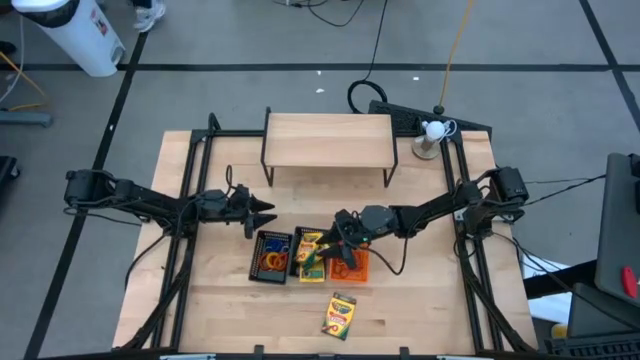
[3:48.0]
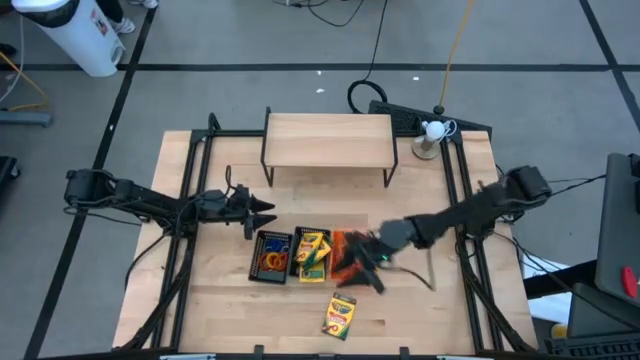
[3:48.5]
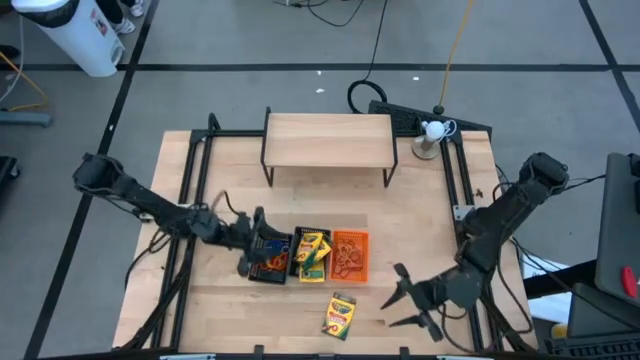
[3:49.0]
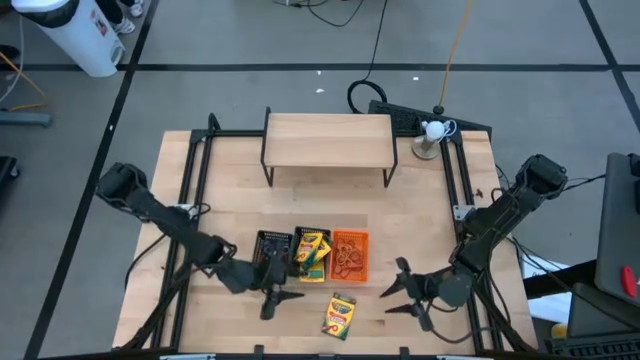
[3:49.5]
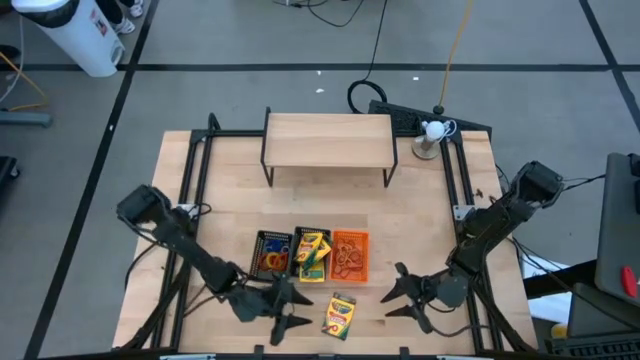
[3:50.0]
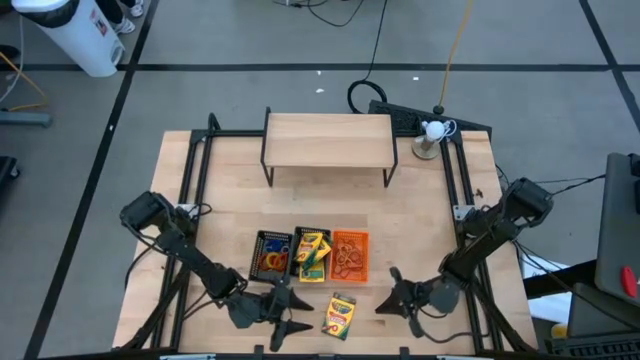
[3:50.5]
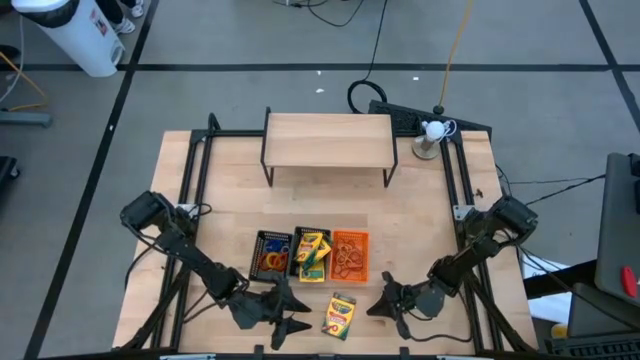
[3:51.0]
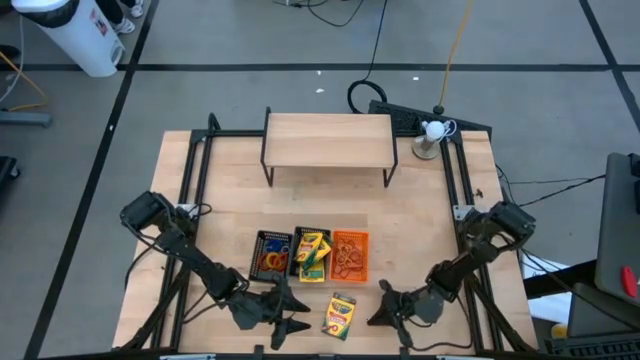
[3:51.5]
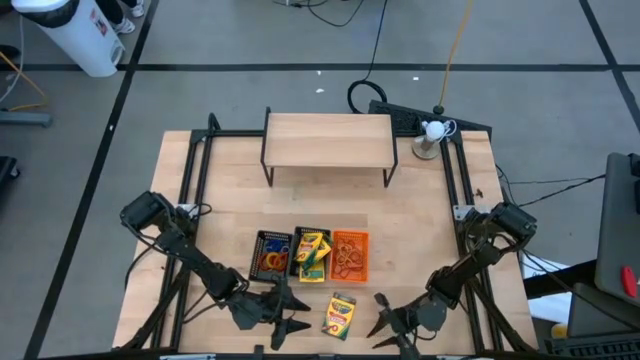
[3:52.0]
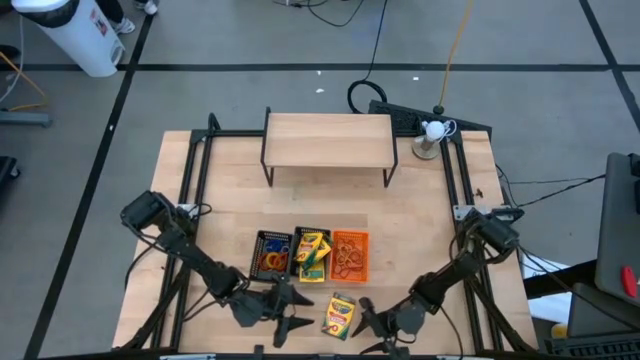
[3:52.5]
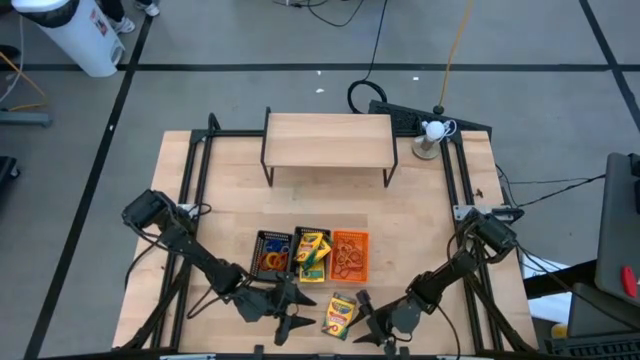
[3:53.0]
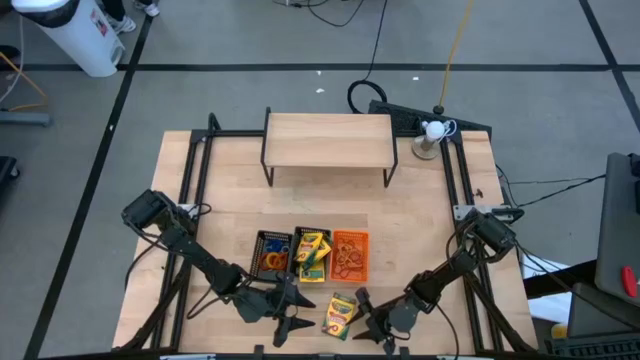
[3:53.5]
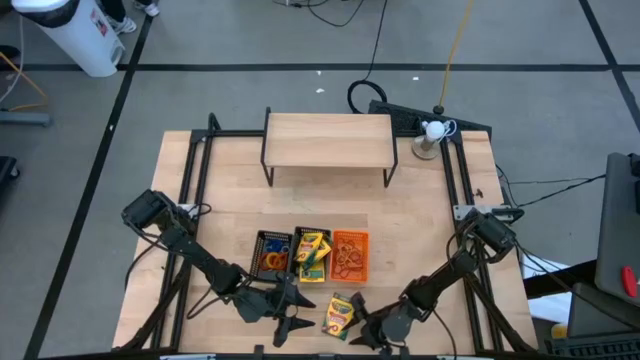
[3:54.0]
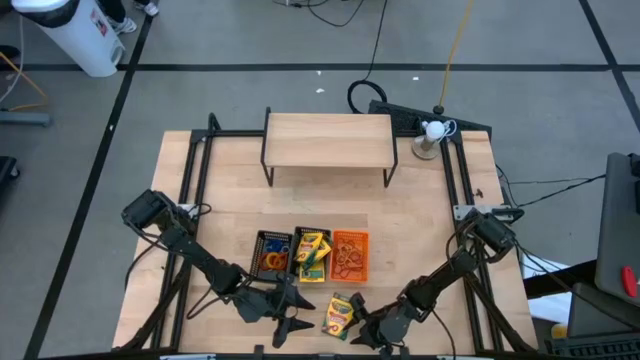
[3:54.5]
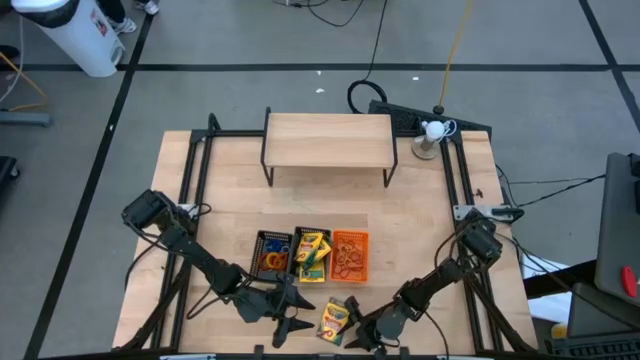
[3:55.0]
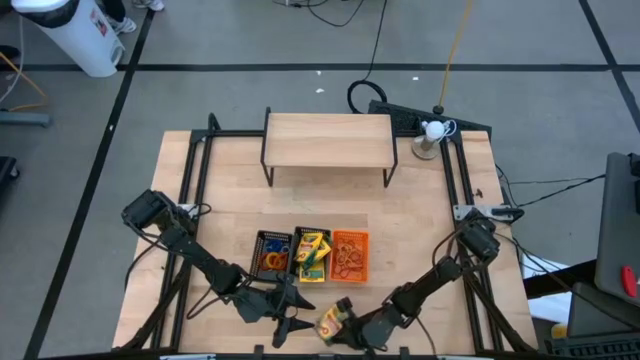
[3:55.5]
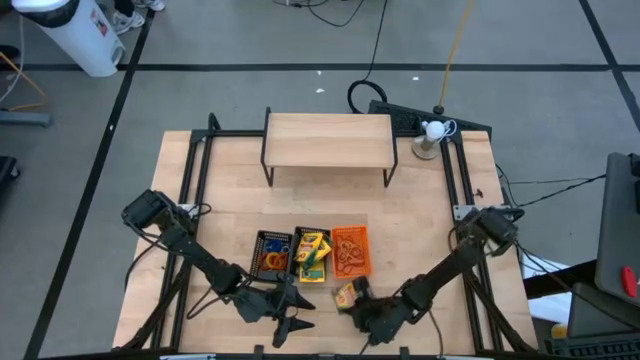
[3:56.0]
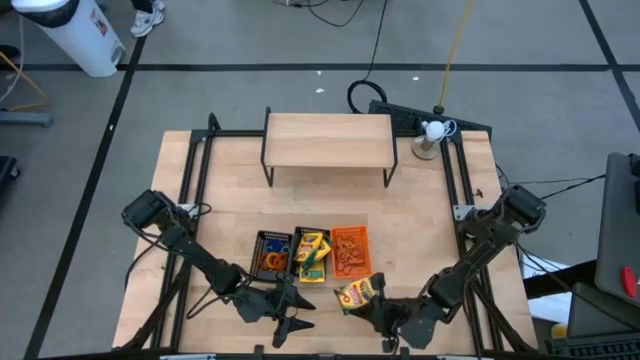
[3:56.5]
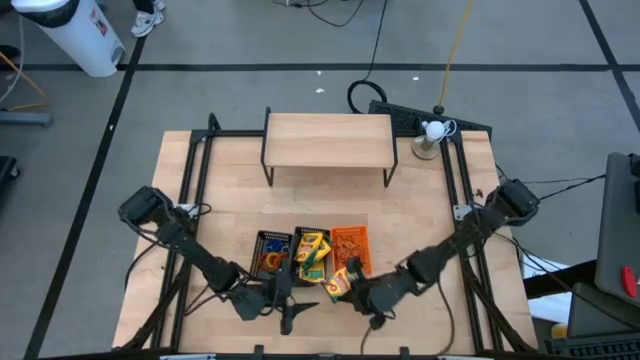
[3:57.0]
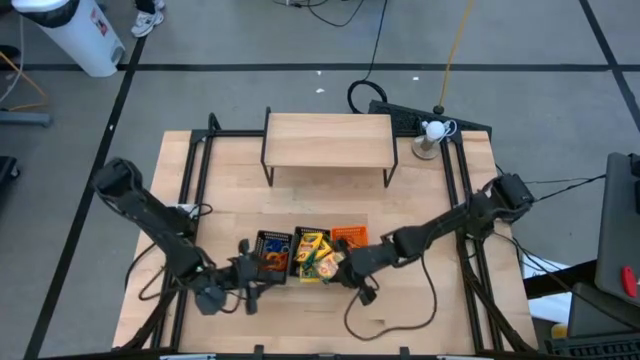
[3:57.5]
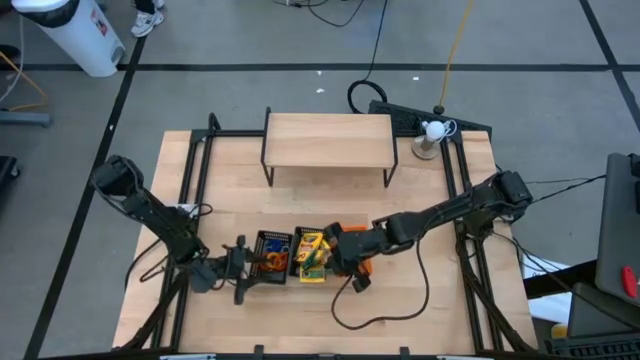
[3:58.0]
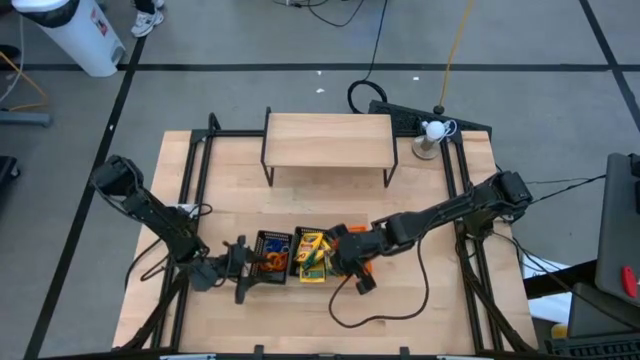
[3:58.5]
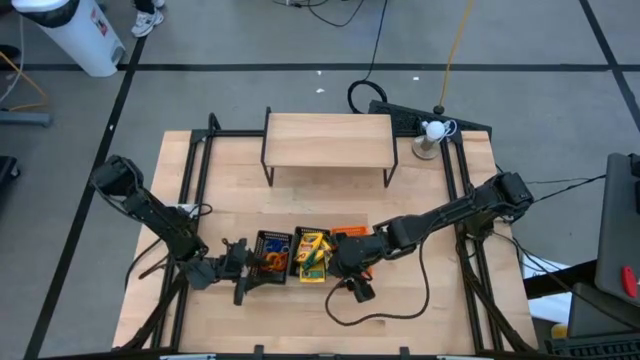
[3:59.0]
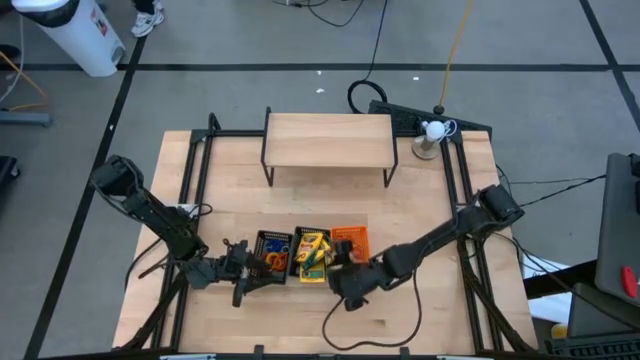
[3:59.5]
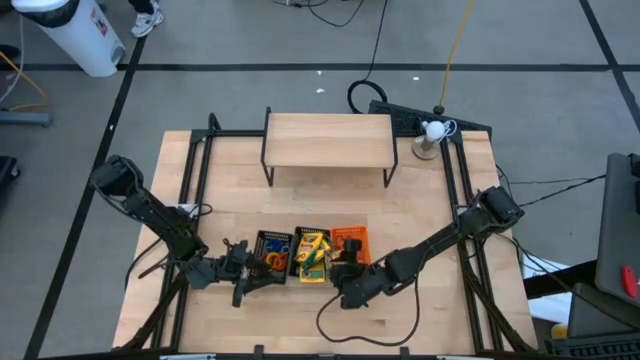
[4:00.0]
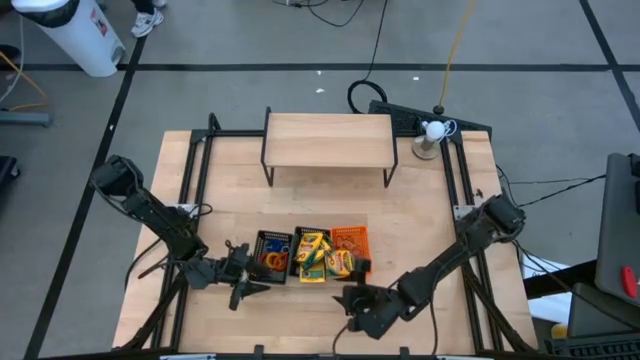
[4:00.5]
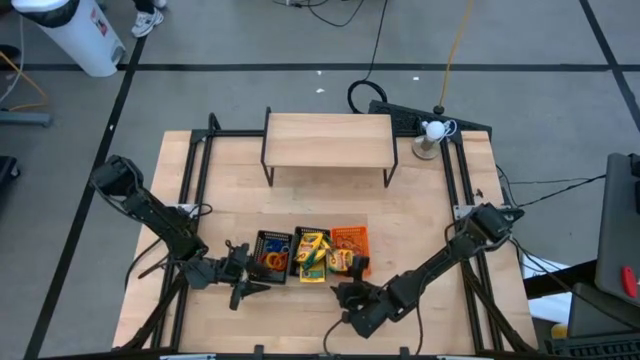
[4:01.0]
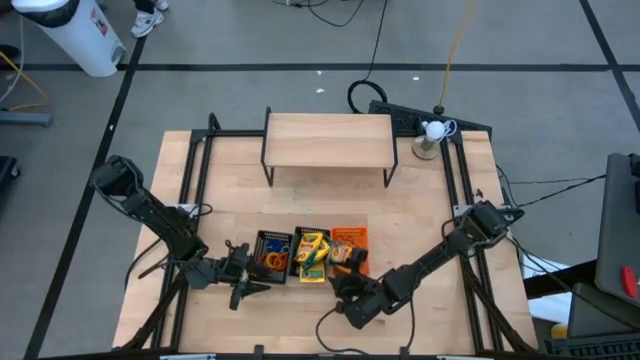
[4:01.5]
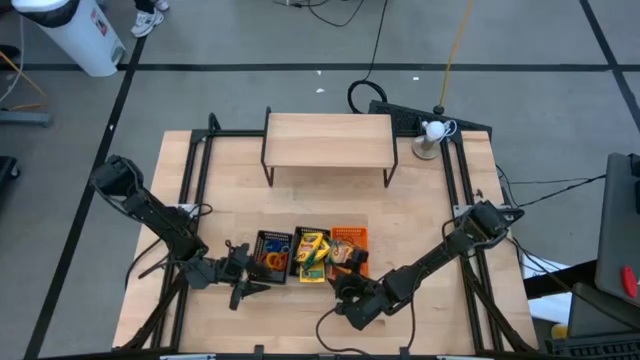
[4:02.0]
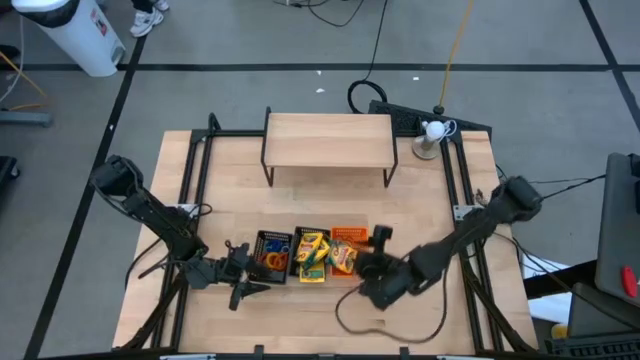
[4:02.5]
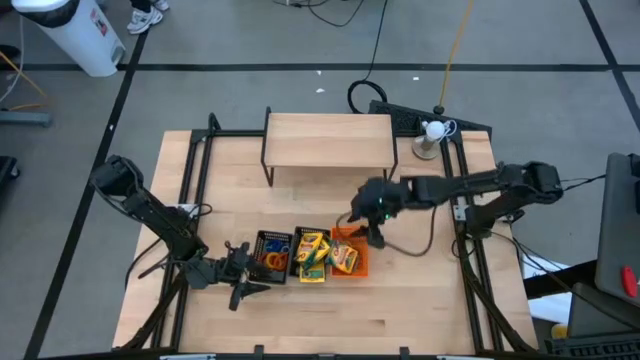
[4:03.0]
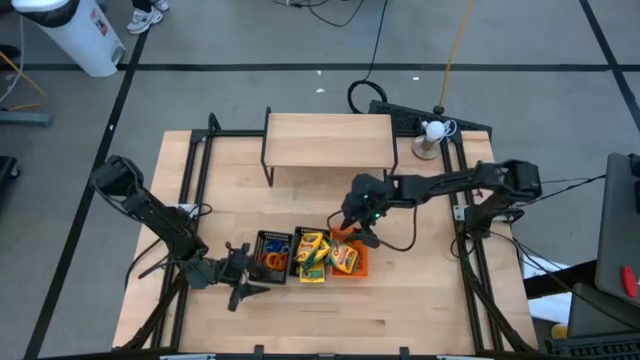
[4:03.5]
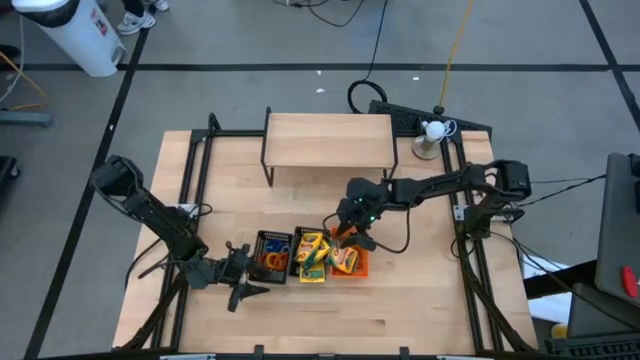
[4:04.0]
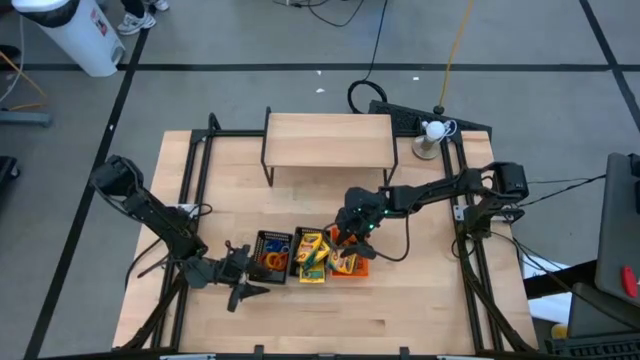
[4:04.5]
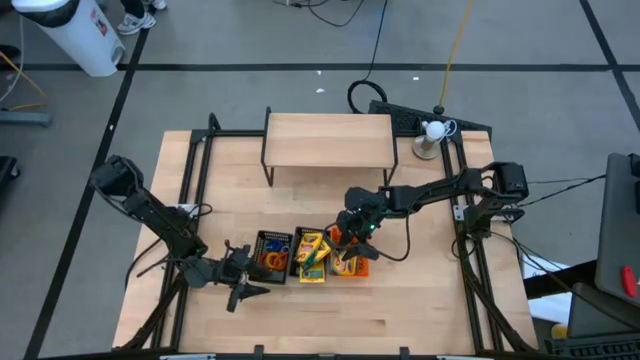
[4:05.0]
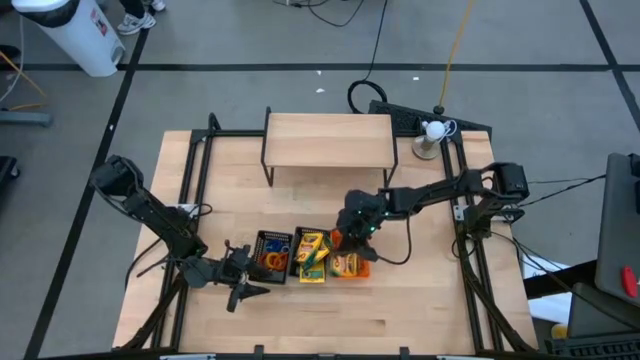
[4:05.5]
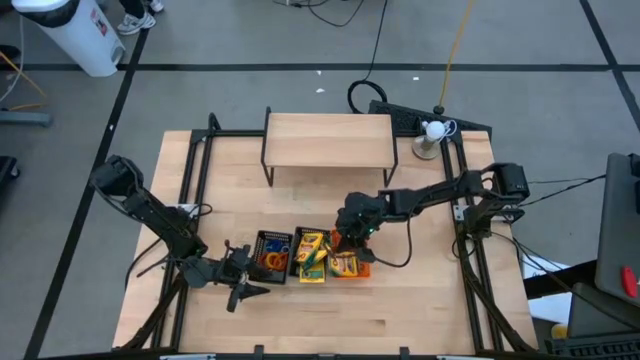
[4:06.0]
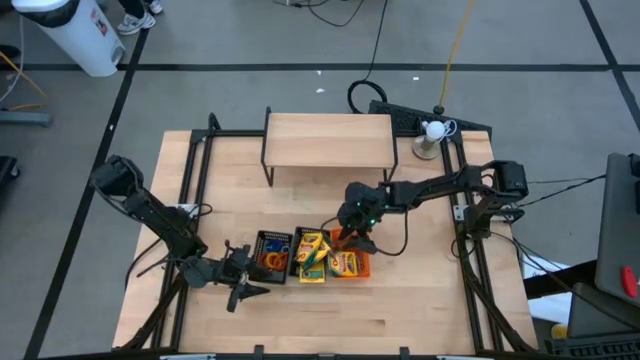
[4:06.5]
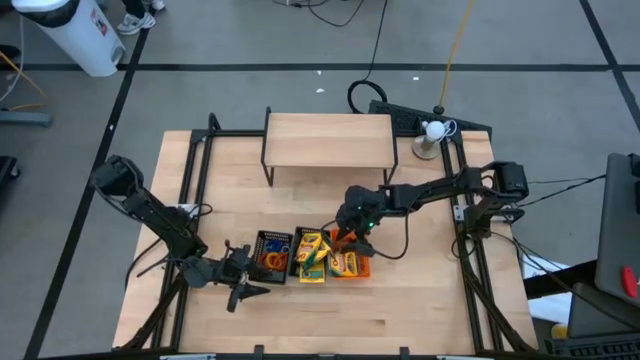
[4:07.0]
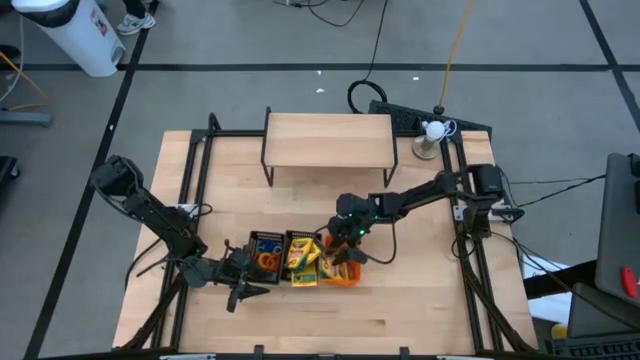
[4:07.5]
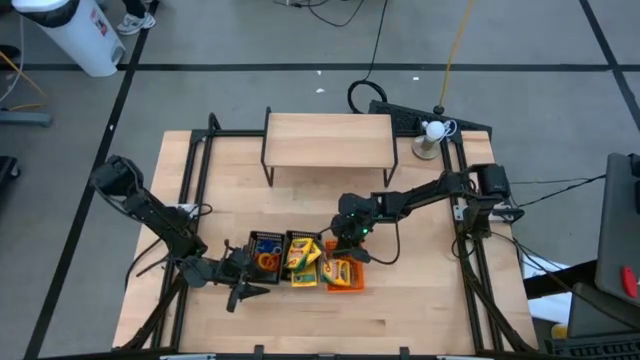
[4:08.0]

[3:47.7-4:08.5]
Task: Pick & Place Office Desk Supplies
Put the crayon box into the right black bin

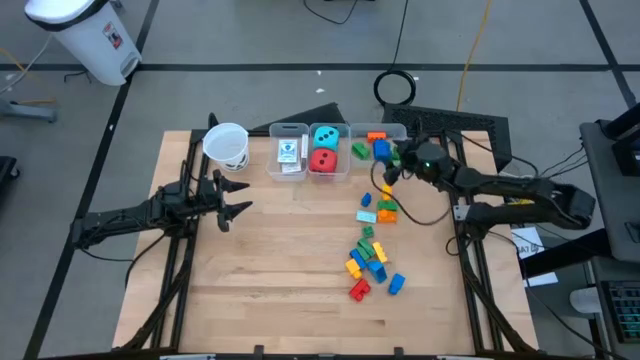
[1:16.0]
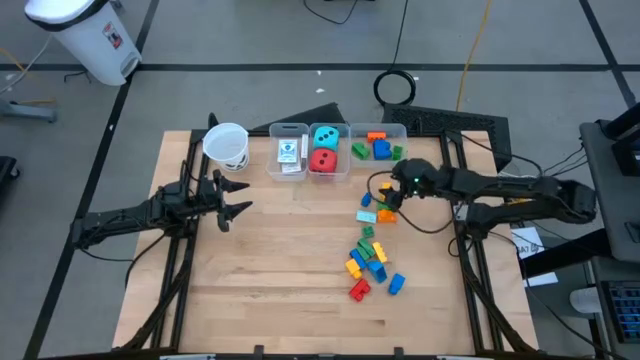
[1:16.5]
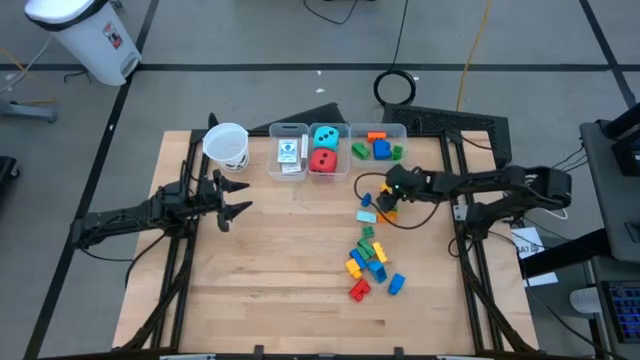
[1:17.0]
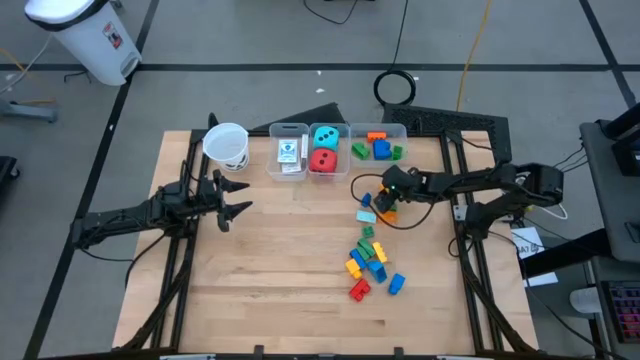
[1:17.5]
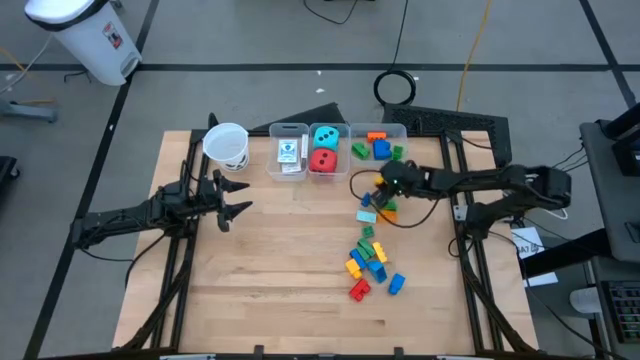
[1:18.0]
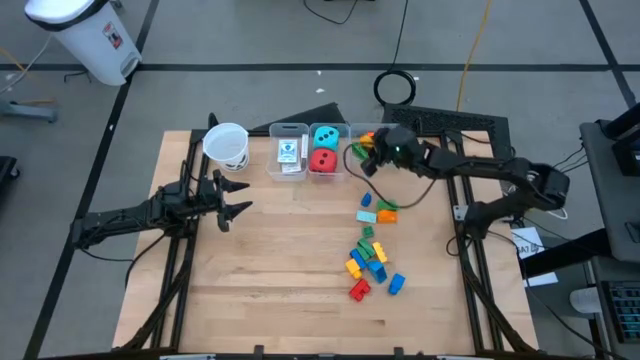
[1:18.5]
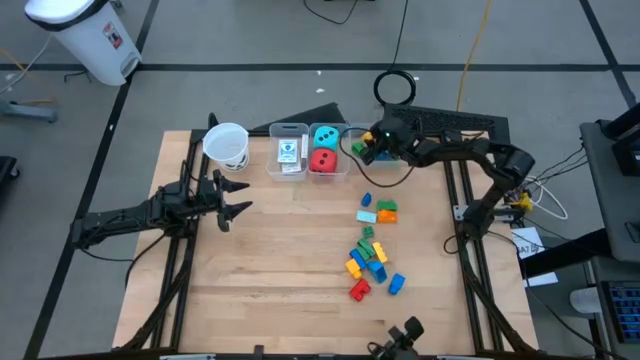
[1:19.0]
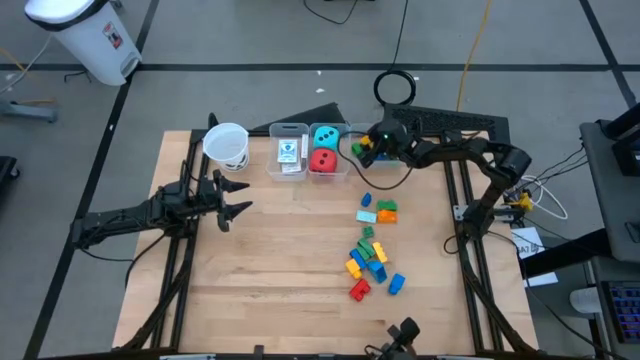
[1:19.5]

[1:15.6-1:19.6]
Task: Pick & Place Toys
Put the yellow game piece into the right transparent bin
